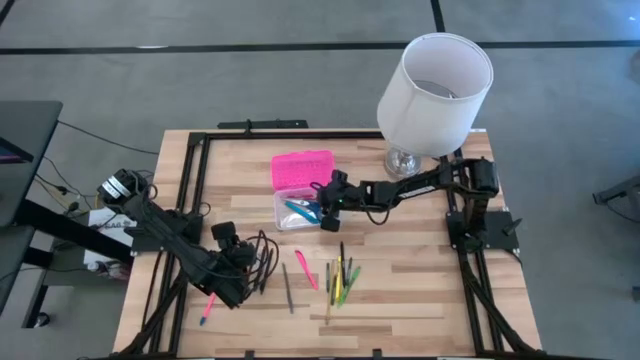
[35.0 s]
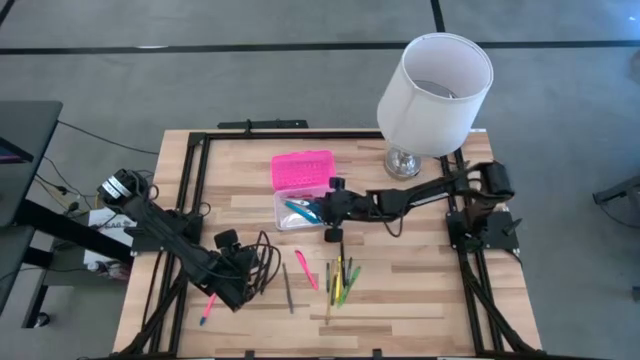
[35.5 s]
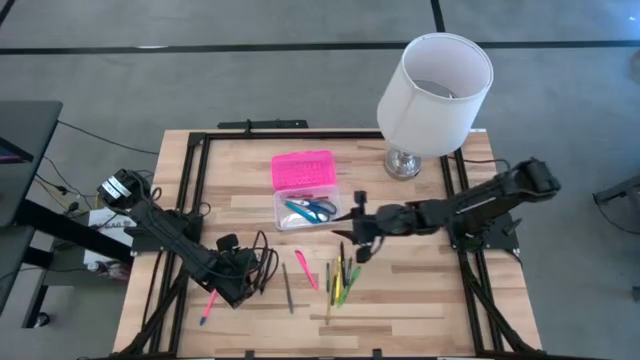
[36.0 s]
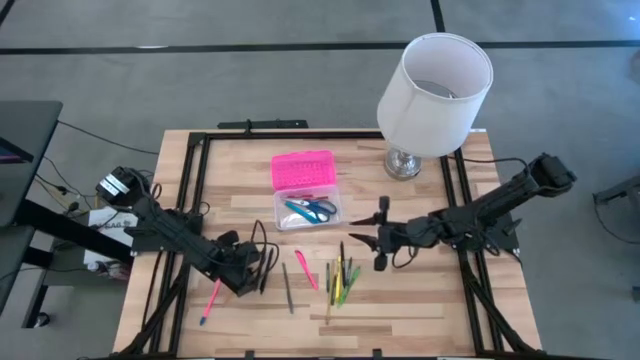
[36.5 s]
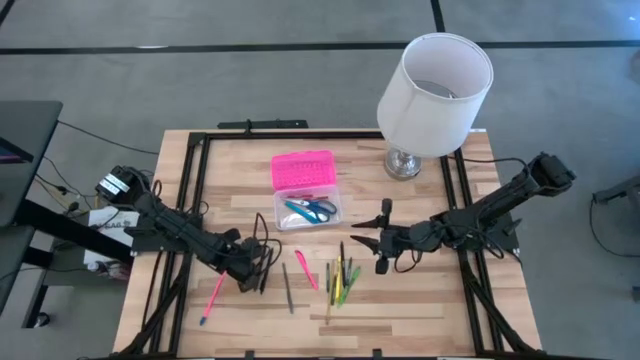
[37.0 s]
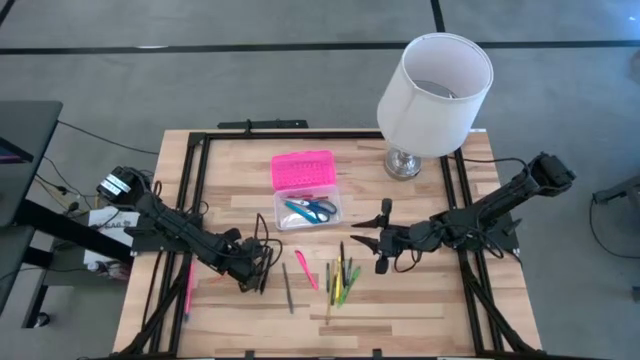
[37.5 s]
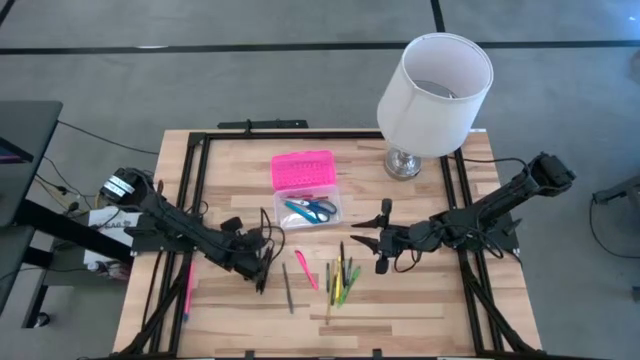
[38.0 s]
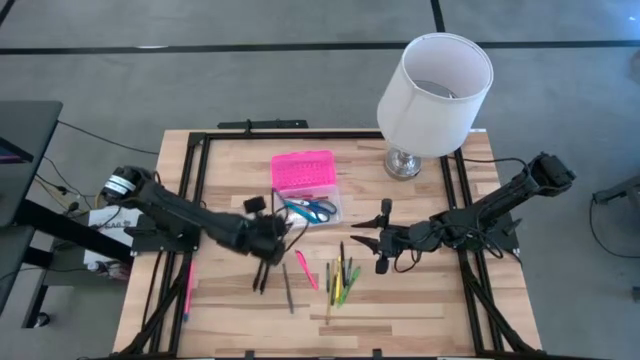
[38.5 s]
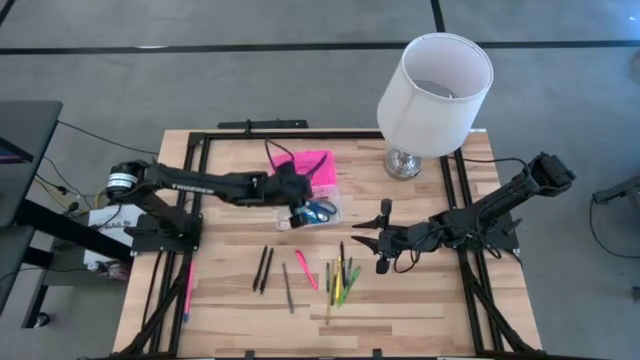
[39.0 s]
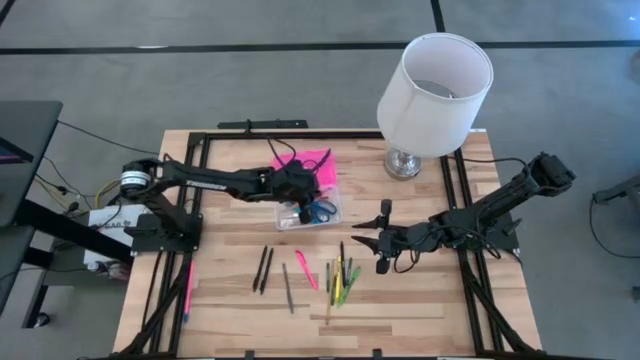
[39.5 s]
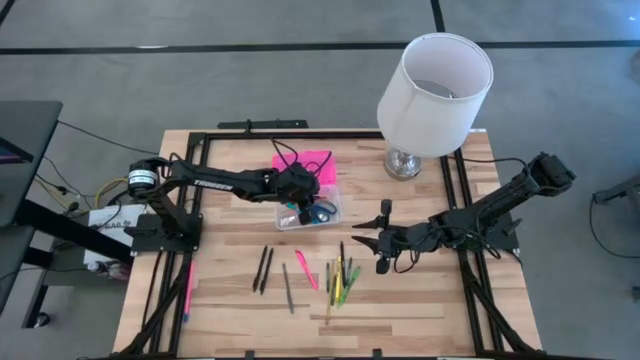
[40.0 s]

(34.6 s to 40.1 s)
Task: Pick & place school supplies into a supply box
Put the yellow pencil into the pink supply box

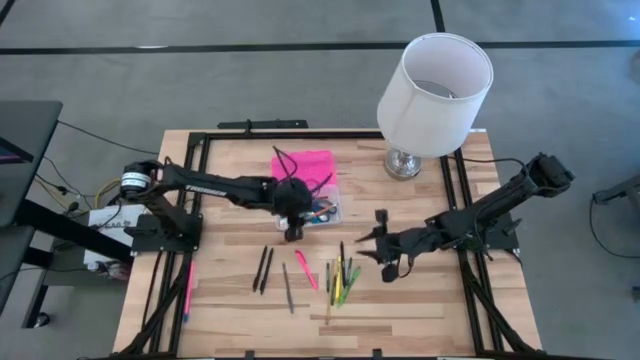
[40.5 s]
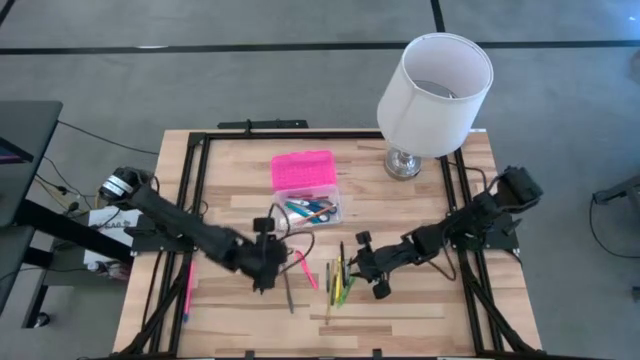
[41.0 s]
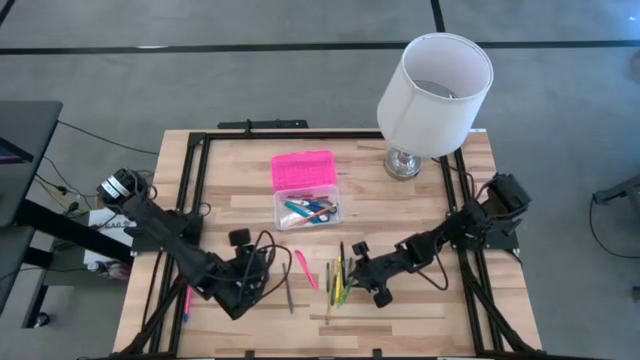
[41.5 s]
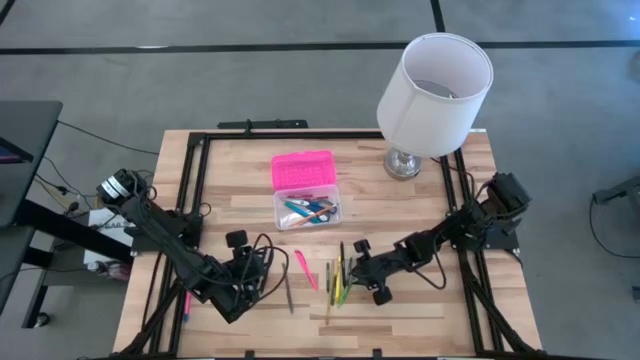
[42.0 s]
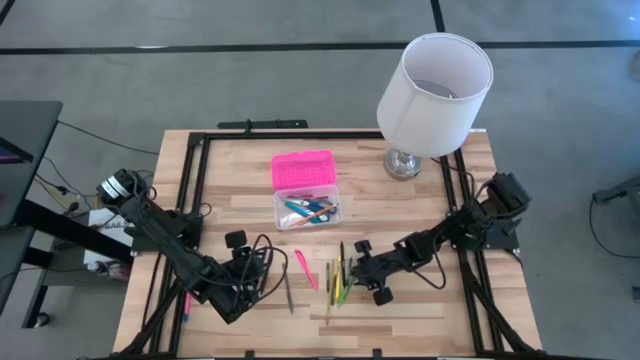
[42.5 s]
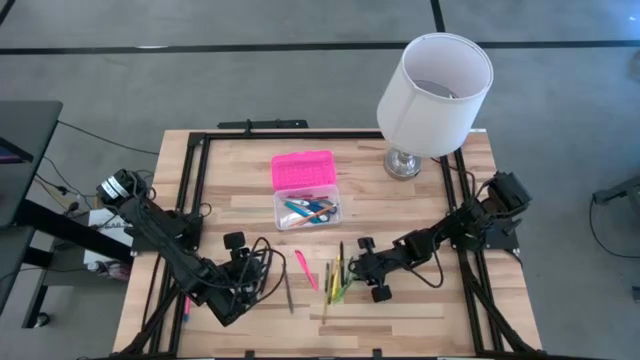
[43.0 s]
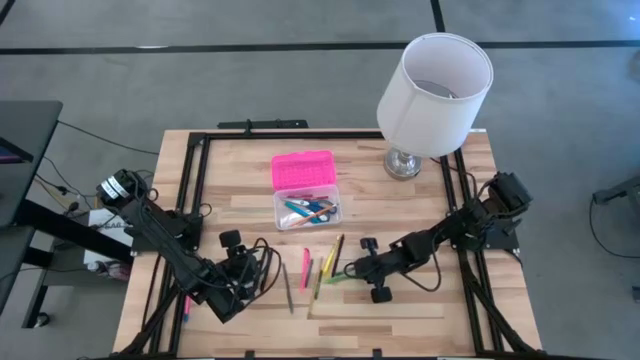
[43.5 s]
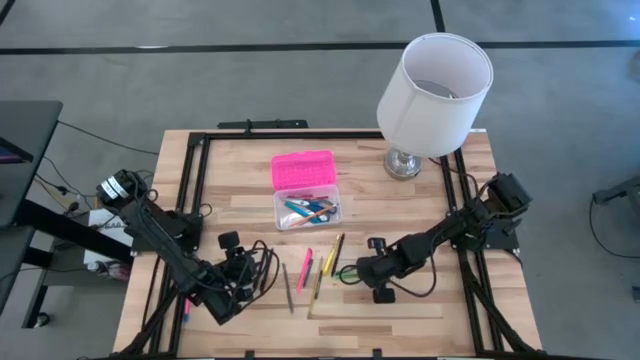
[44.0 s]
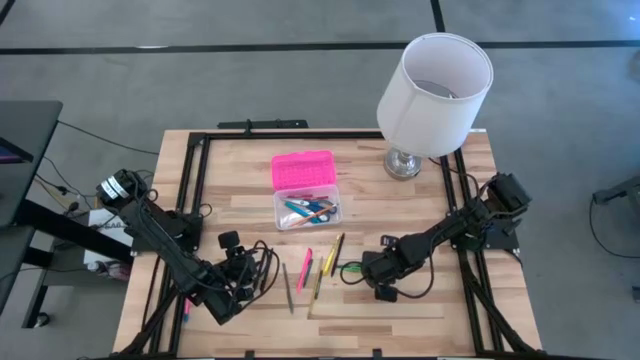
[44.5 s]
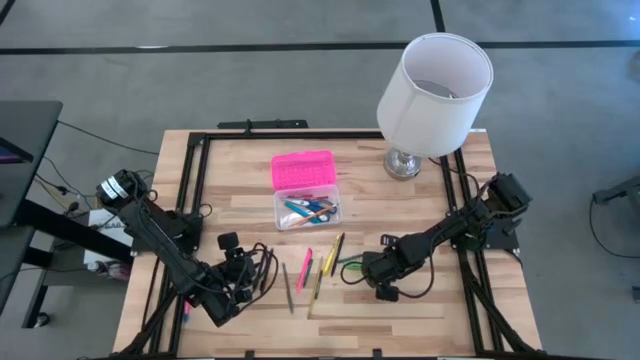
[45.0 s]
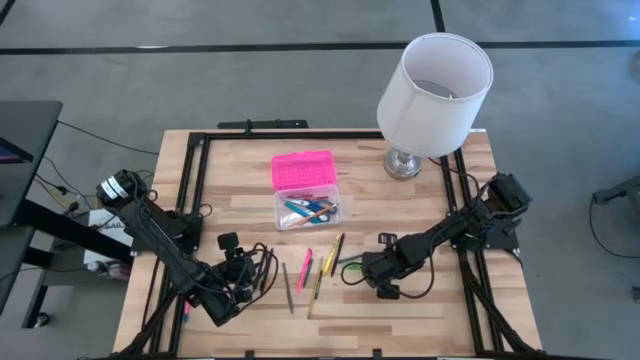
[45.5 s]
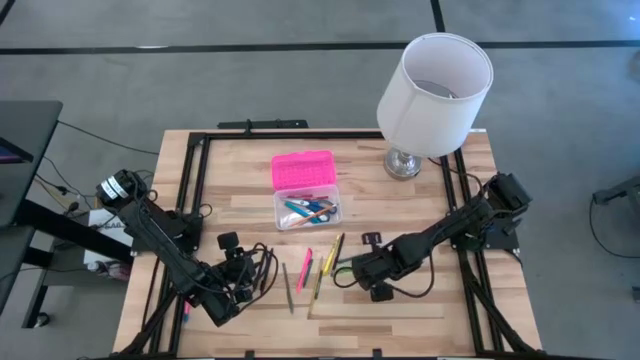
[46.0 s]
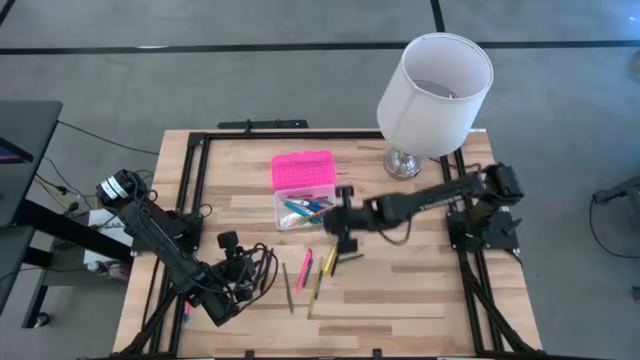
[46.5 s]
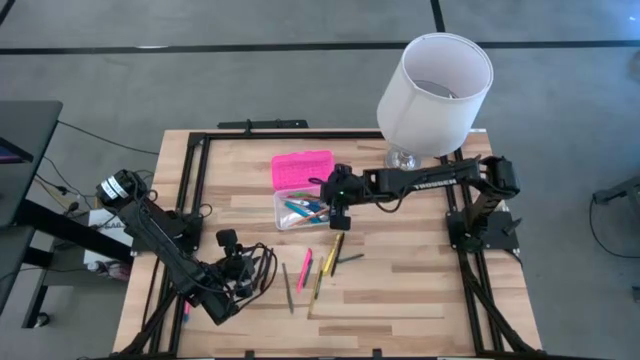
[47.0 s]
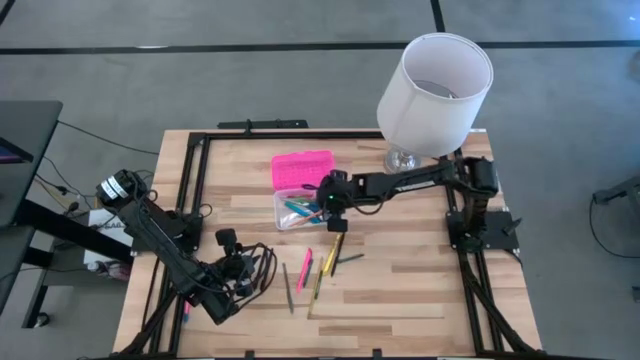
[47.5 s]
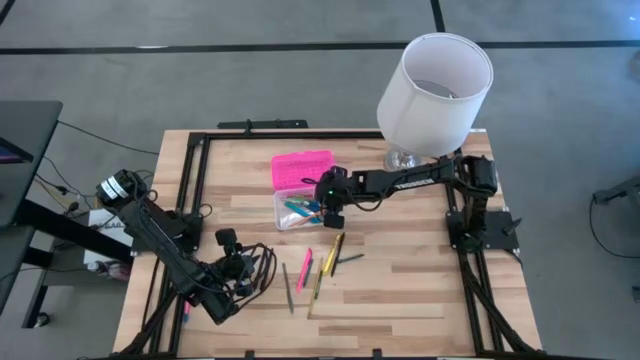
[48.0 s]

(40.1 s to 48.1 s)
Put the green pen into the pink supply box

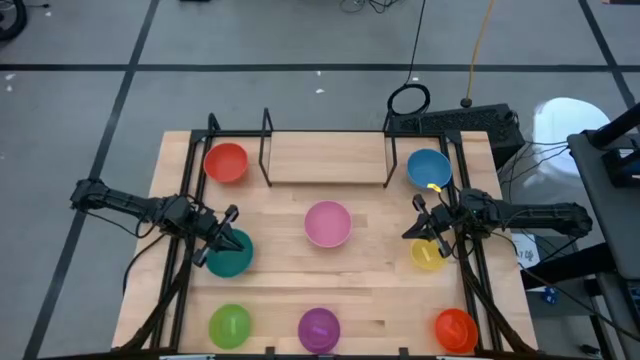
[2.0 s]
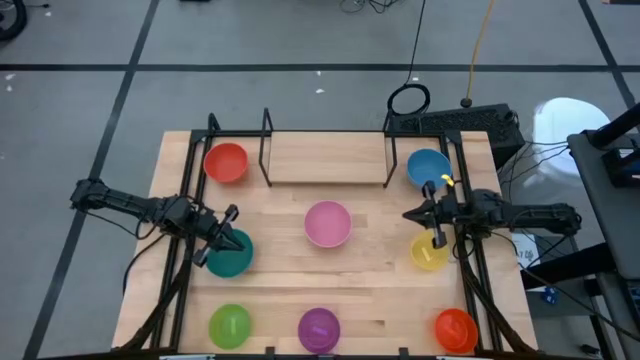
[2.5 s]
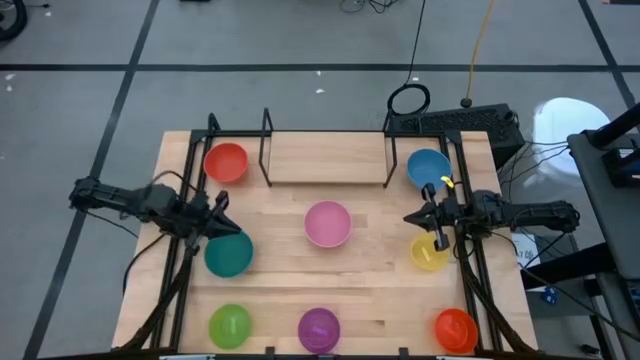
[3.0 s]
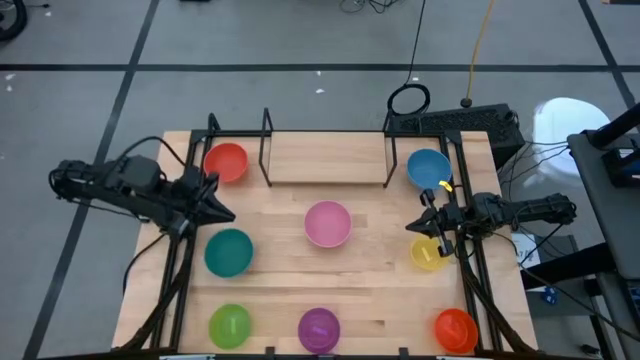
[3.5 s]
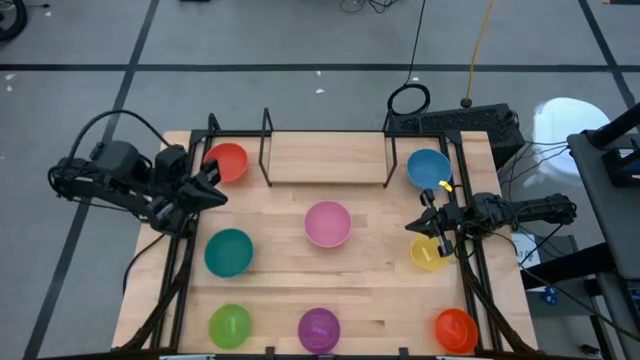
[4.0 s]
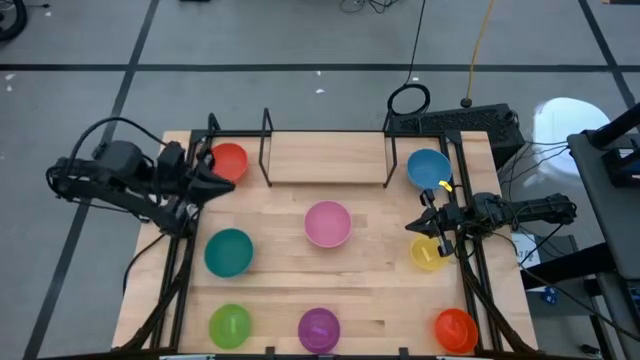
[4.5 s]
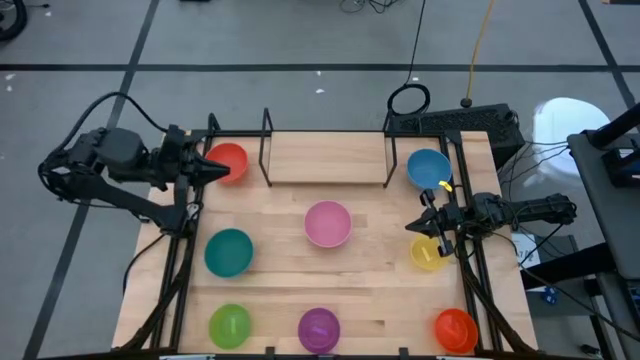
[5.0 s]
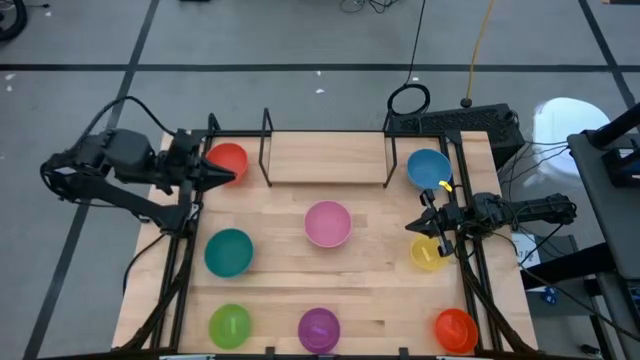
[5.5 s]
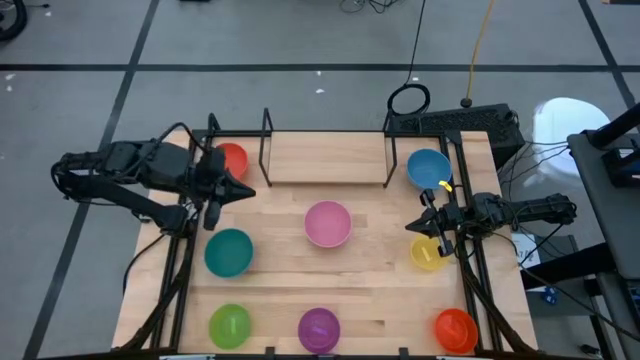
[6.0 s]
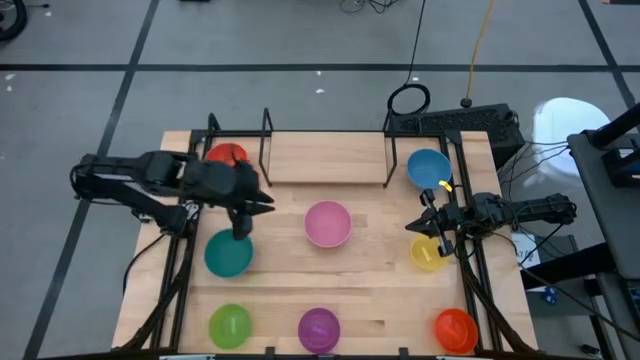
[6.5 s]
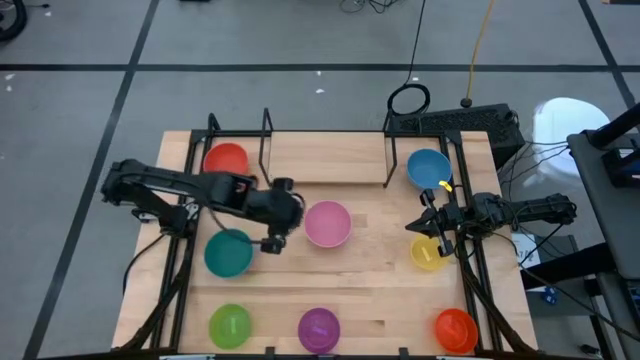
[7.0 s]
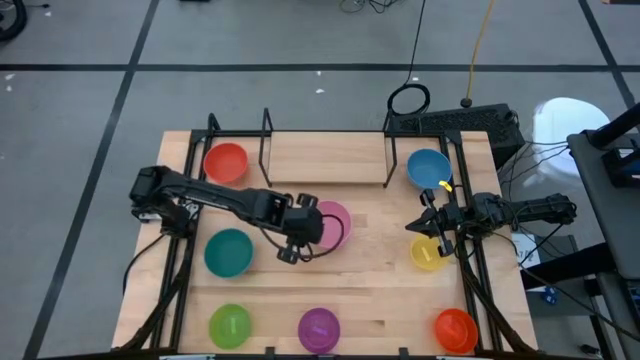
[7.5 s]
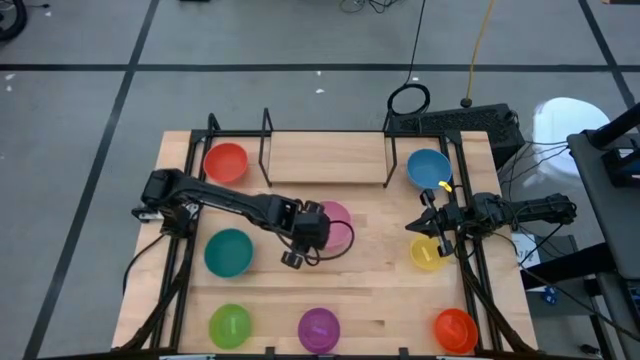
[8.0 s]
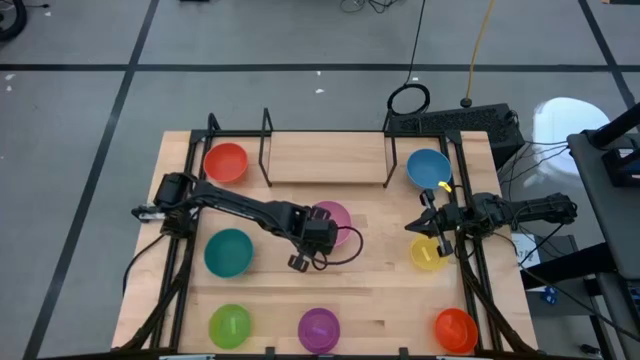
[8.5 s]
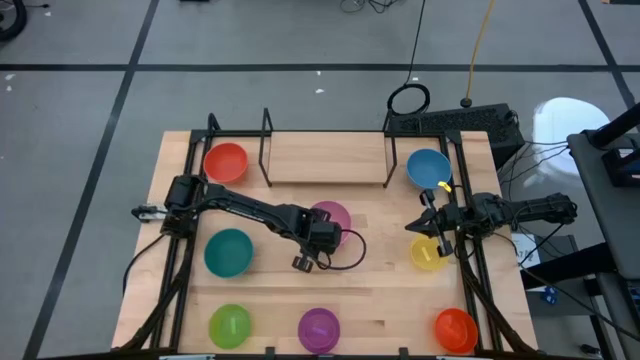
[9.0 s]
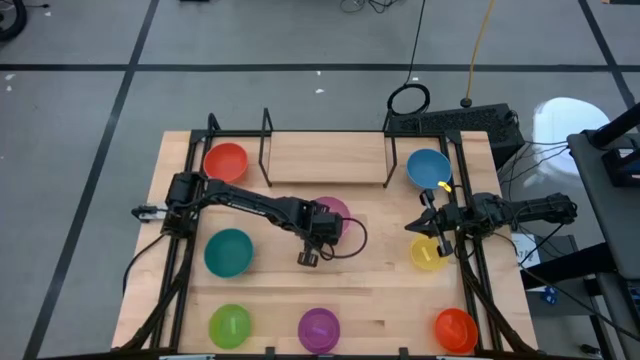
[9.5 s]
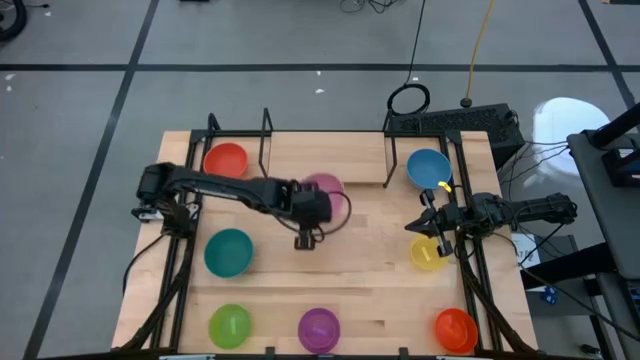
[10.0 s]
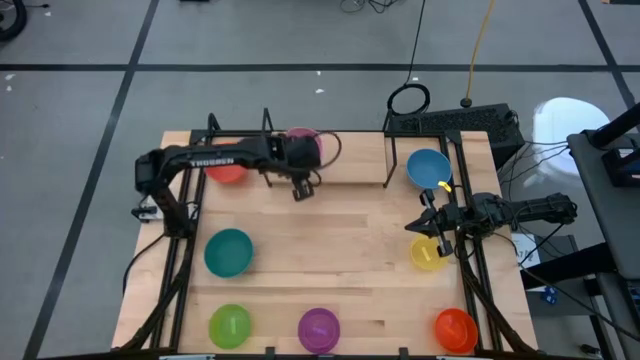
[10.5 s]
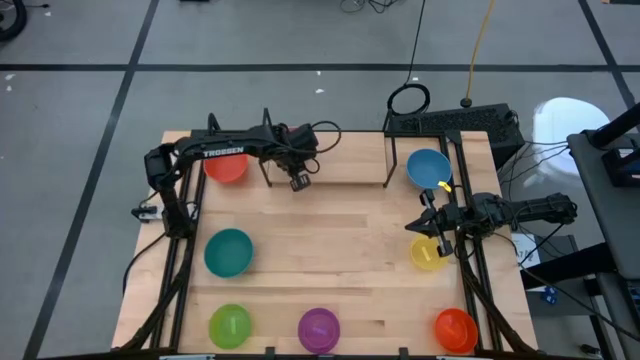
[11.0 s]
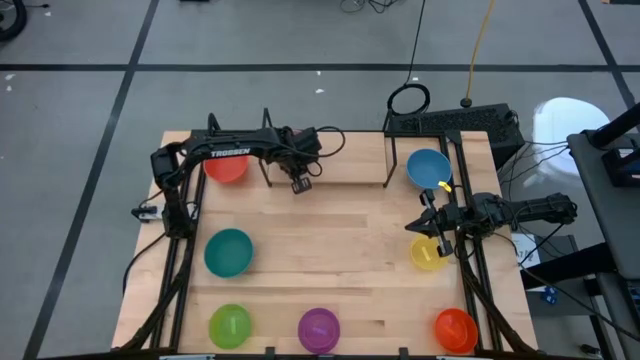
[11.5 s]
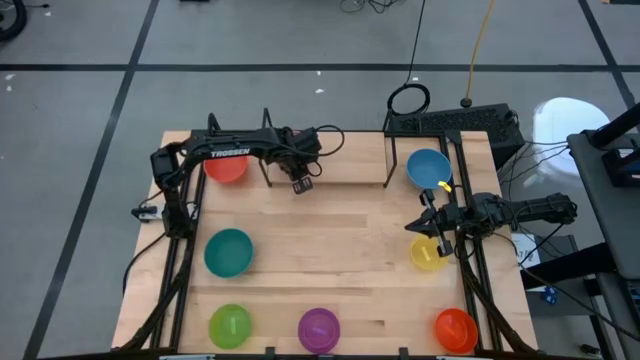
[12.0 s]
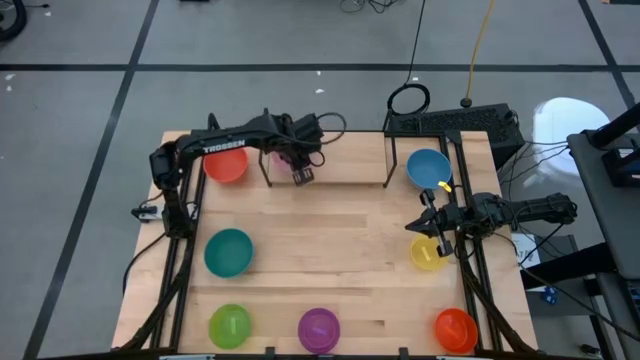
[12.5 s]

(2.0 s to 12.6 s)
Task: Place and stack bowls onto a shelf
Put the pink bowl on the shelf
